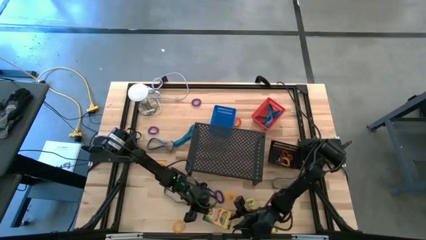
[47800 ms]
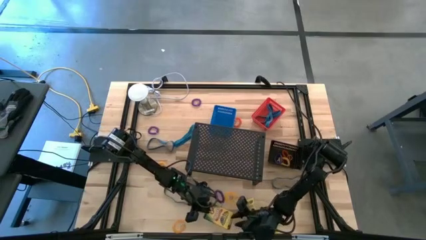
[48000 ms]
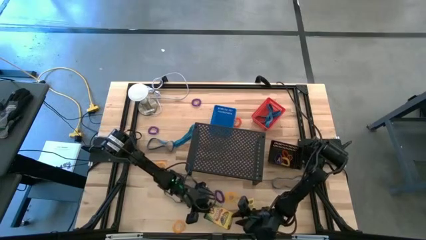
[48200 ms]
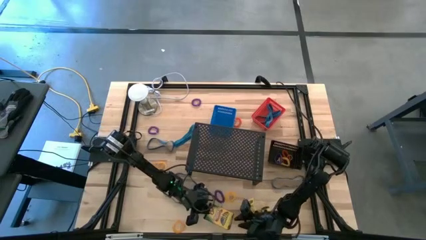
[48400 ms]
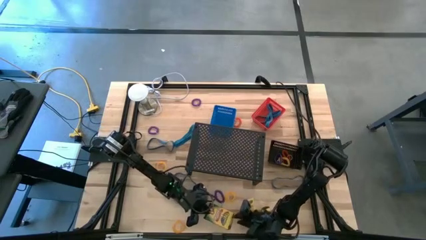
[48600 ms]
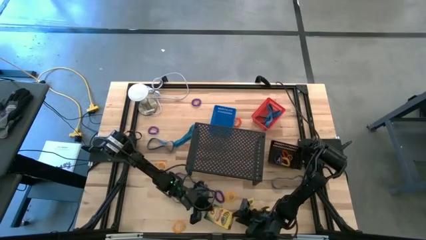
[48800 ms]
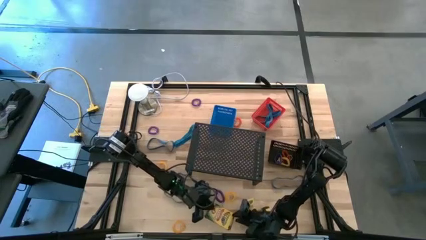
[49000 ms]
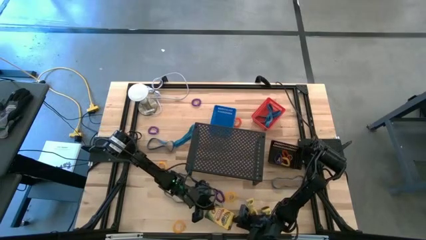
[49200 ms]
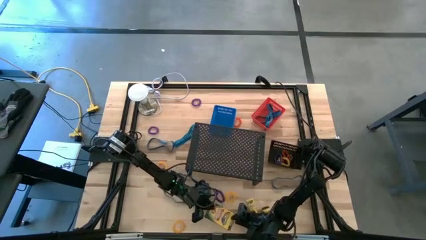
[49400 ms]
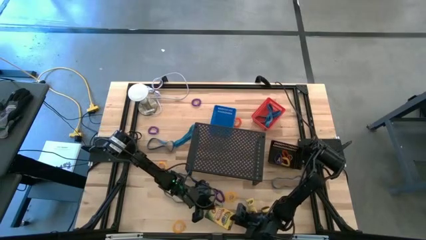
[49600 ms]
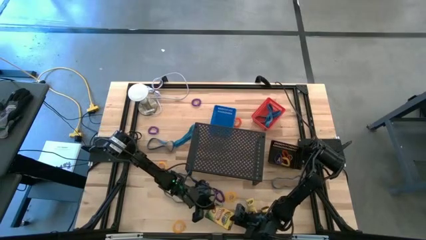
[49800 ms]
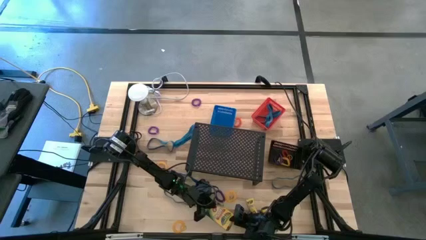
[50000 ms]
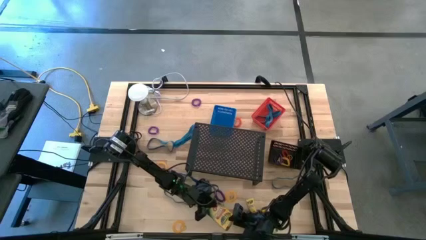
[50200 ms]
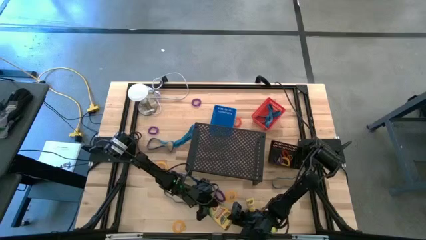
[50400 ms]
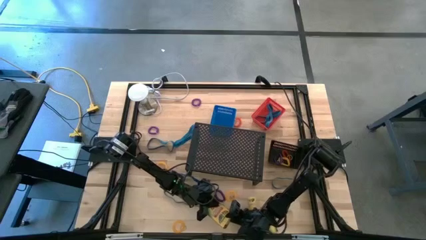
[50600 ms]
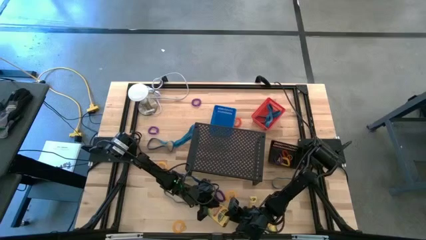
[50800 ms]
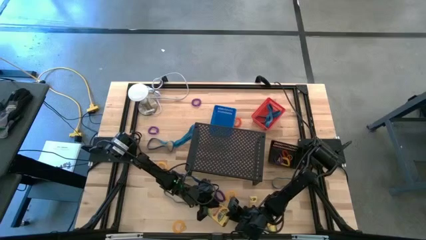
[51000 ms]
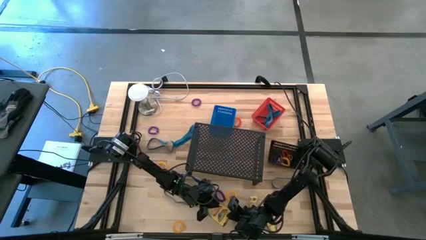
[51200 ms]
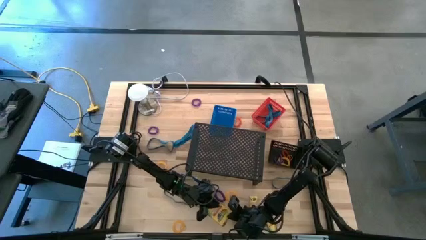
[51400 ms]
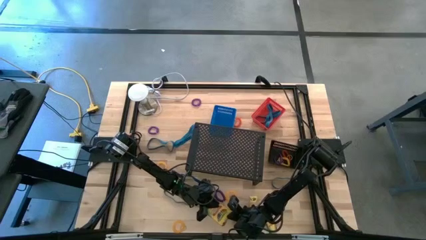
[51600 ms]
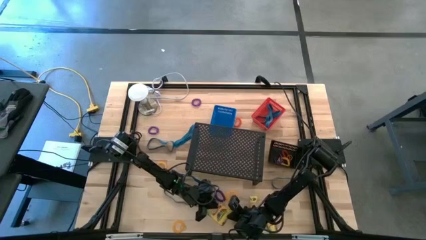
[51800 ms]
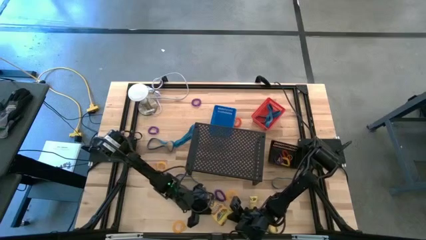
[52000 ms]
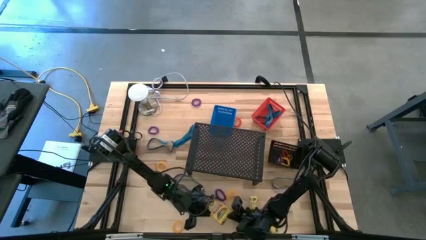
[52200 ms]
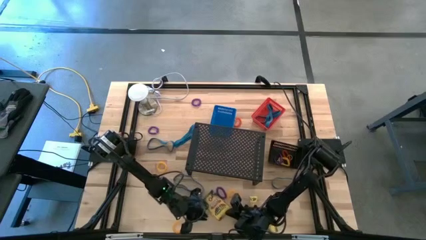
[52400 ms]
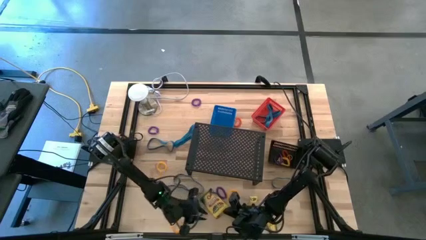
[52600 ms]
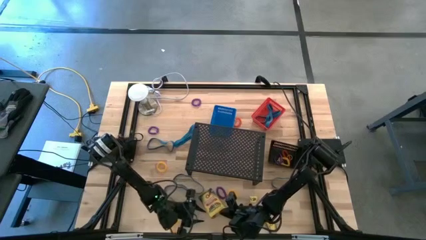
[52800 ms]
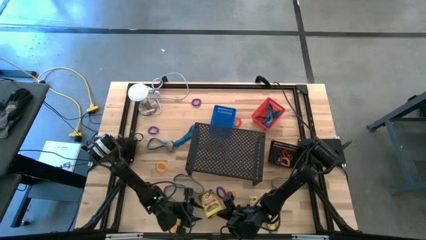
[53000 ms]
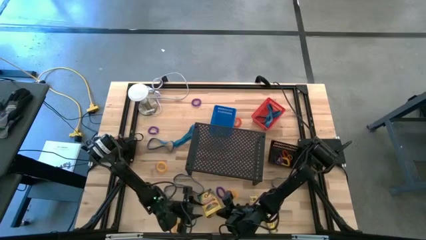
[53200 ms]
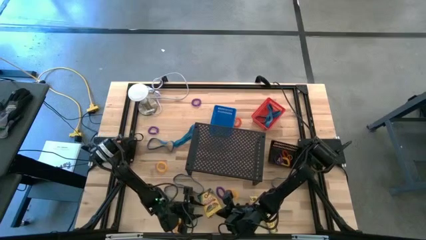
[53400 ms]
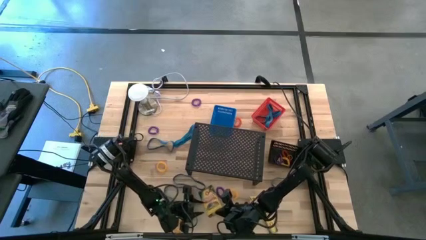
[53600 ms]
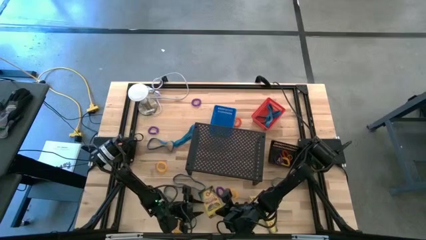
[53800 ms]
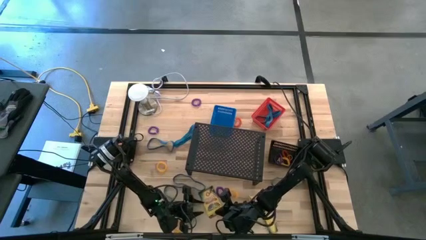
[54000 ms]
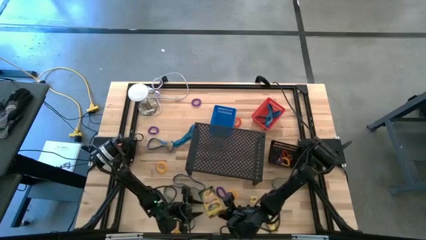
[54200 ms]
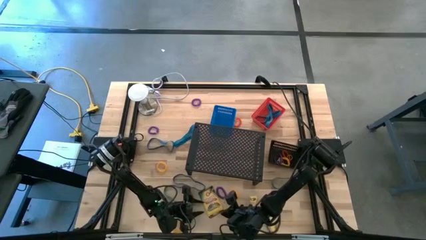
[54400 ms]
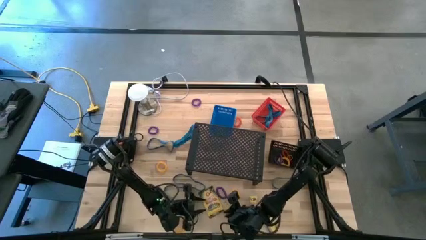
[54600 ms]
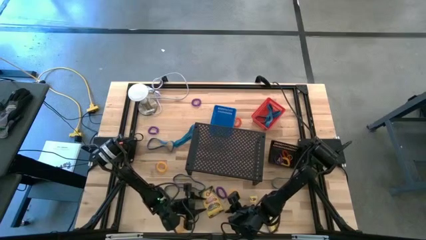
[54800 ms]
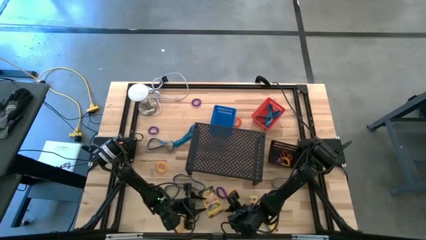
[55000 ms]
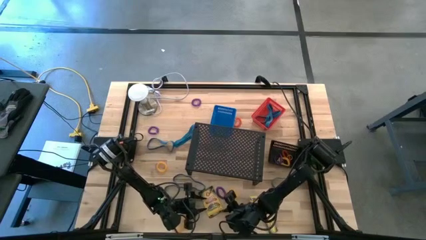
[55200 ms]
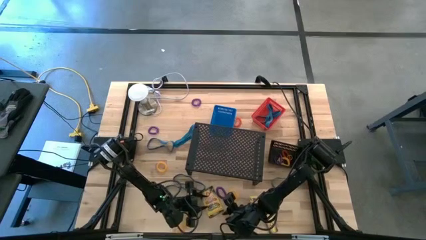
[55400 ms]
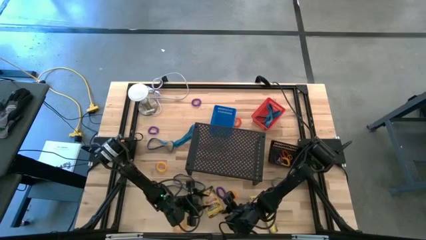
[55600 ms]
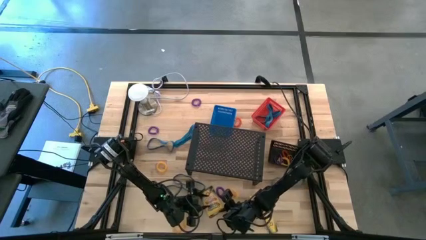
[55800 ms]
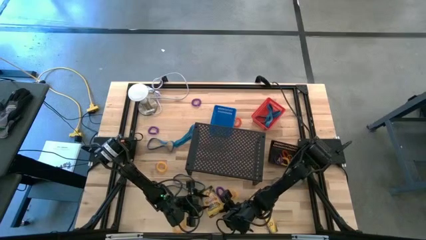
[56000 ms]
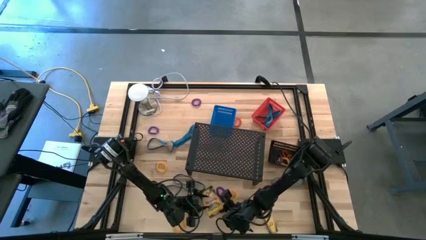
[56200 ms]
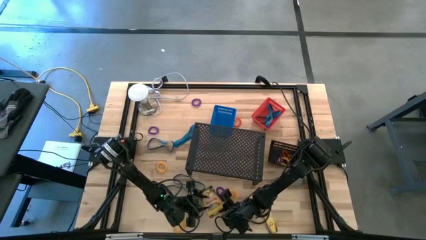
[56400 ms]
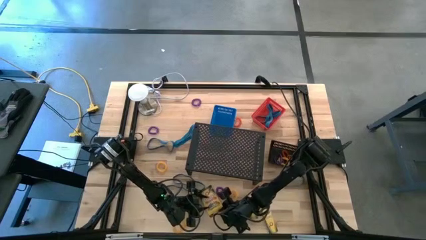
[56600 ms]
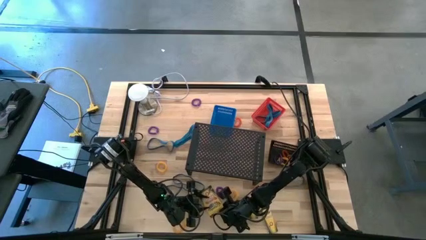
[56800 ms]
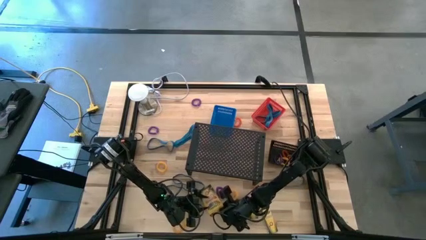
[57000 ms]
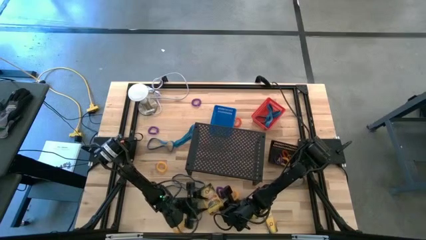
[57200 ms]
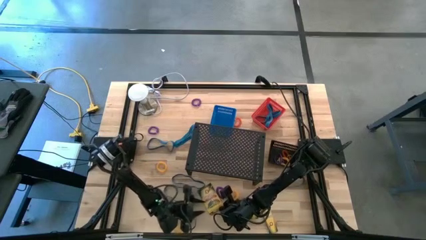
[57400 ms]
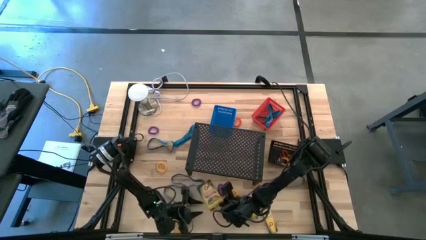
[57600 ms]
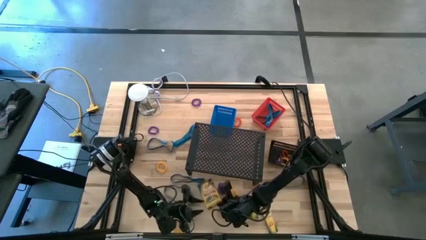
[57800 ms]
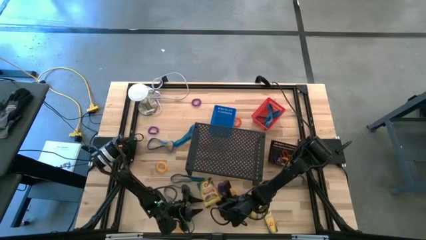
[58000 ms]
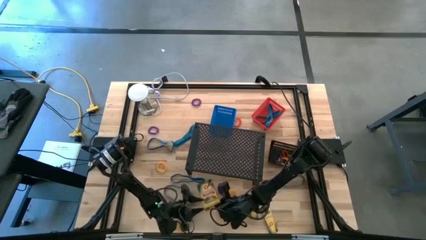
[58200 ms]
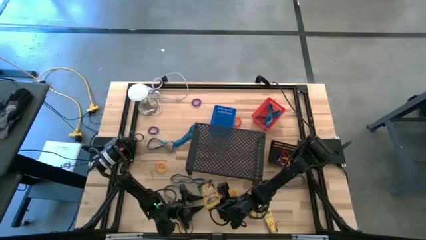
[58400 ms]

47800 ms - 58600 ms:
Task: Pick & Place Office Desk Supplies
Put the yellow crayon box into the blue bin

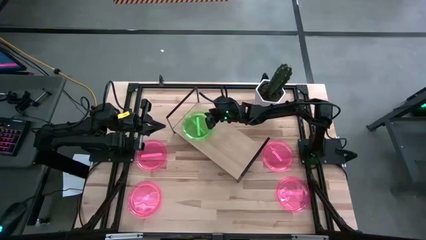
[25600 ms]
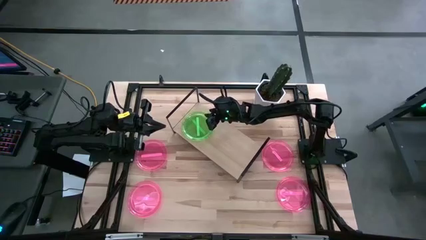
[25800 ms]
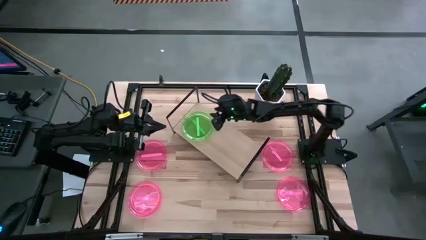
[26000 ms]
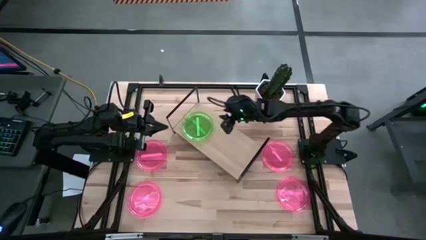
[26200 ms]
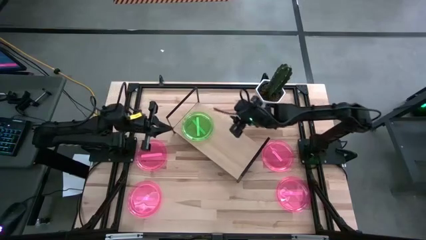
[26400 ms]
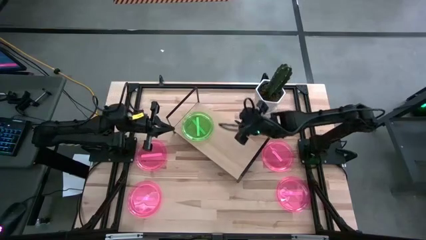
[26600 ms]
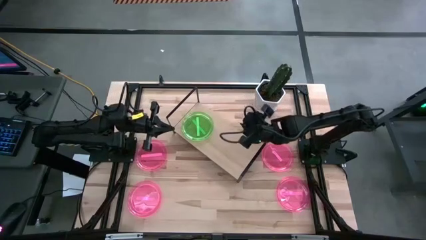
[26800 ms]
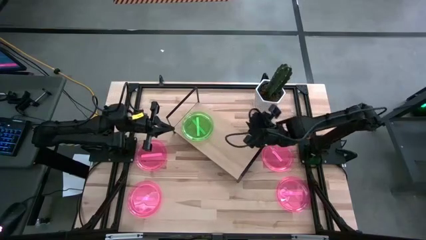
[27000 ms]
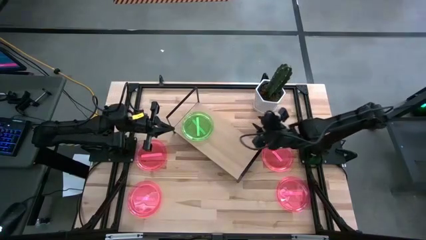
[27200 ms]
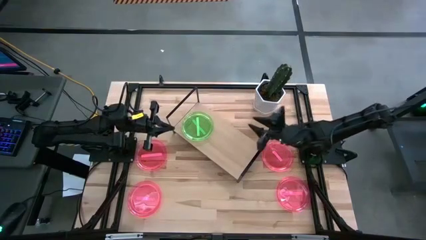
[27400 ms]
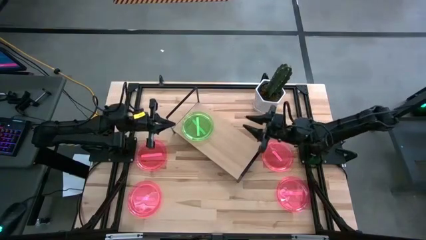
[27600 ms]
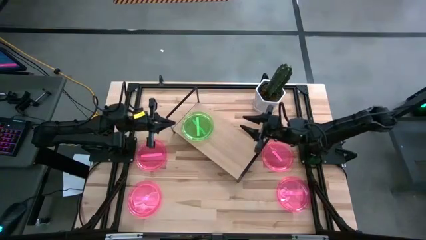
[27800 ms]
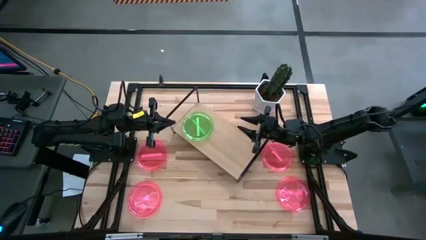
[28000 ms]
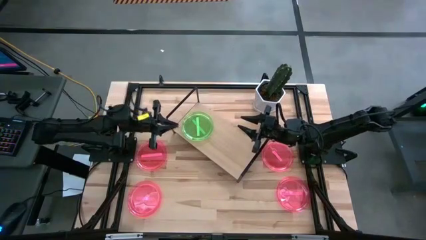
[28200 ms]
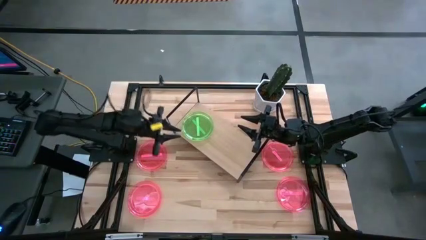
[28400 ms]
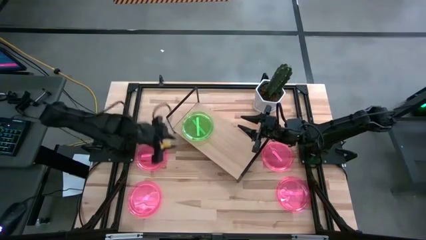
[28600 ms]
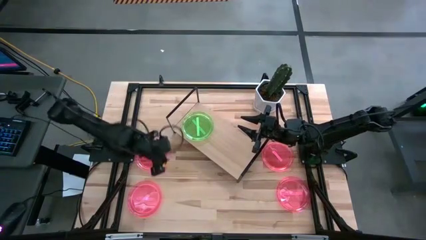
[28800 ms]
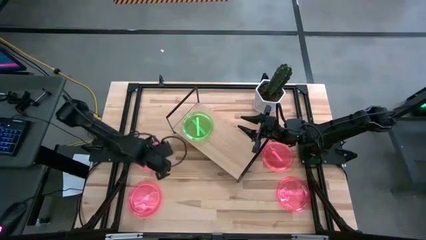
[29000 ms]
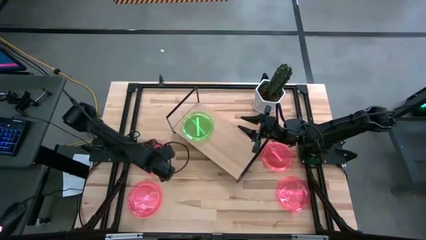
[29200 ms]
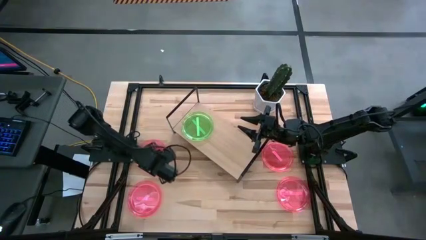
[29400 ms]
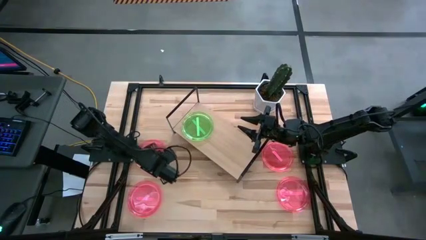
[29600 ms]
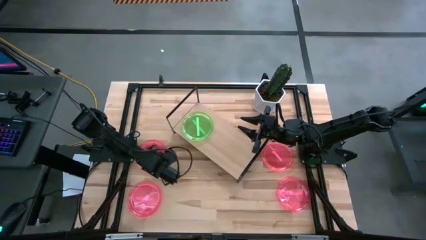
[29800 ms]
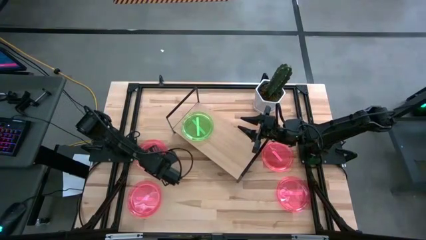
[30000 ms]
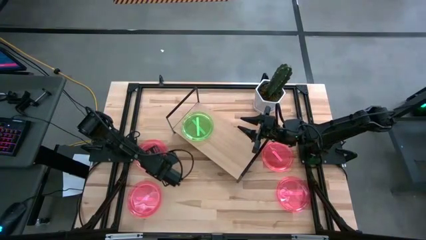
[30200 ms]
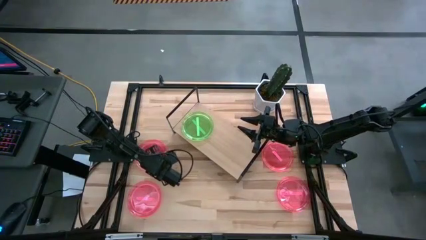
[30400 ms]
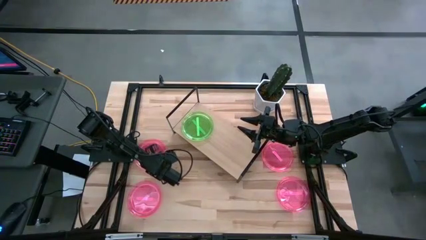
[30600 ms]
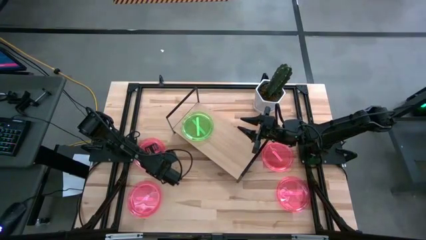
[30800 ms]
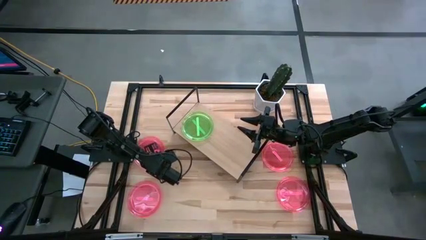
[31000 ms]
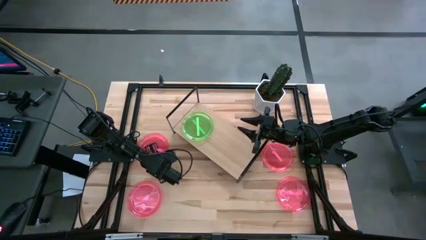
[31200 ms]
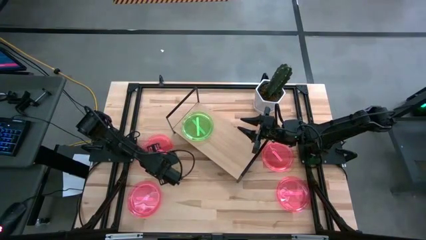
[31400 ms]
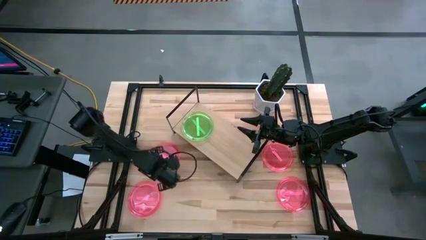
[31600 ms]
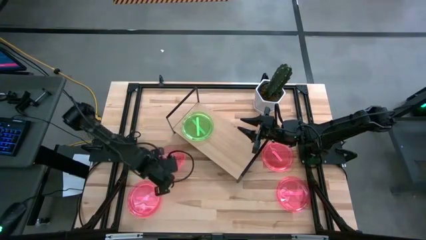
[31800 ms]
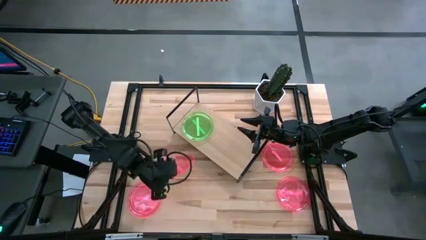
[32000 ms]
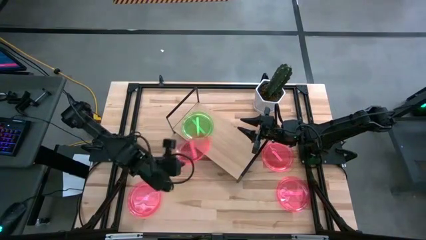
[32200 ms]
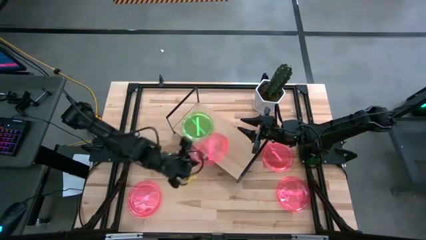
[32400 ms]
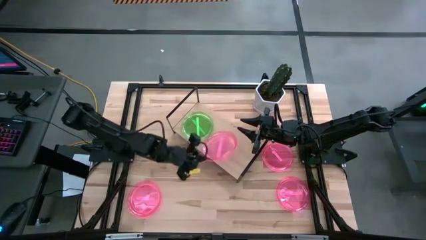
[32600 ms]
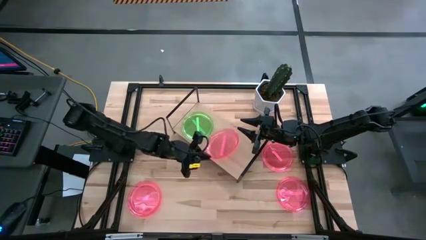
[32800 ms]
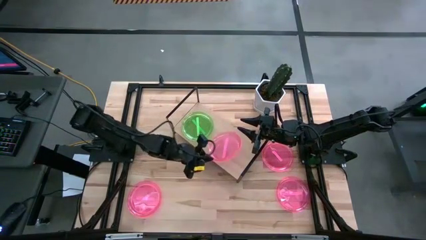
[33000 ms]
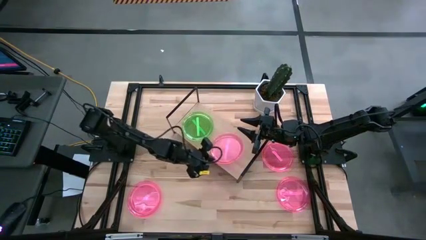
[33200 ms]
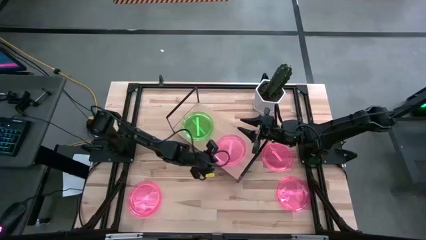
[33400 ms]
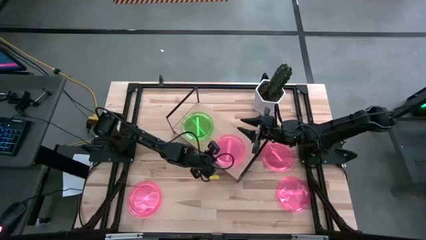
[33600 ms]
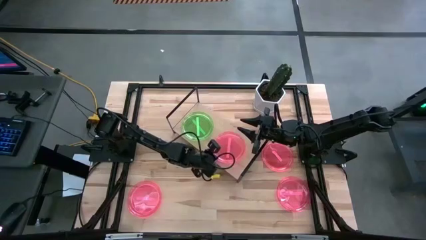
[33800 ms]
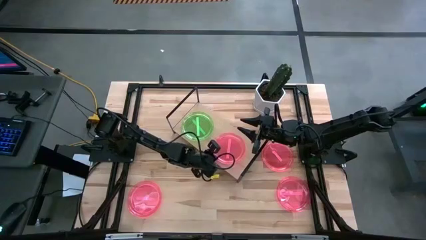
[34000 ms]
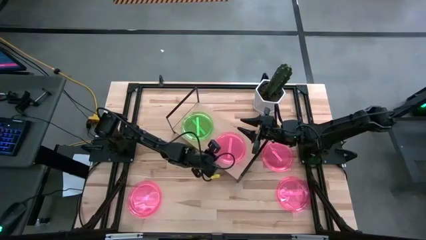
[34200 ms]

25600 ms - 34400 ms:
Task: Place and stack plates onto a shelf
Put the pink plate on the shelf
